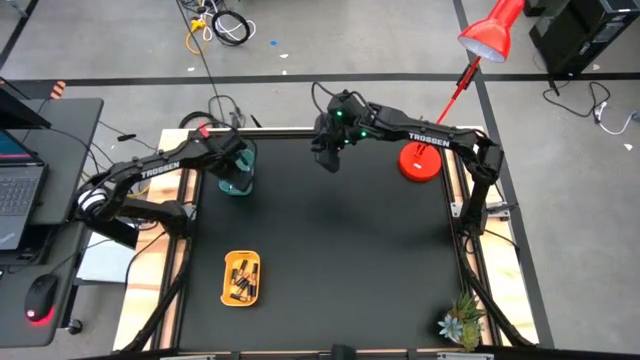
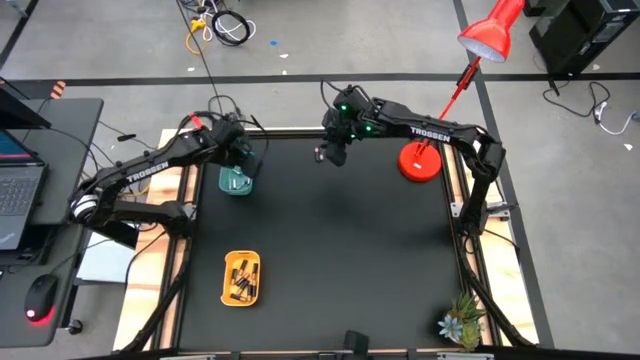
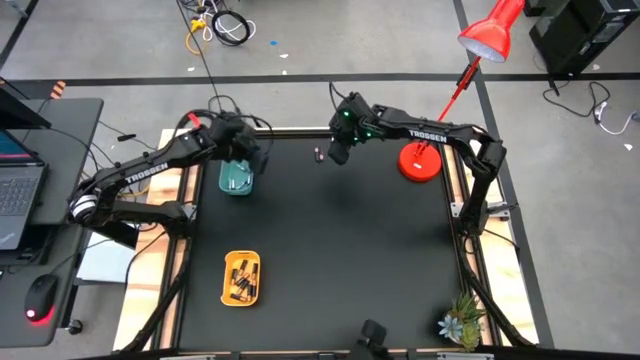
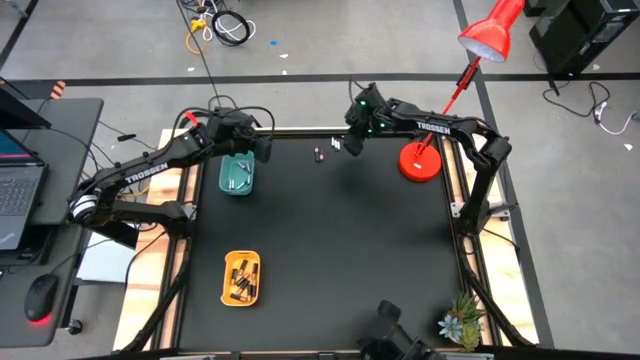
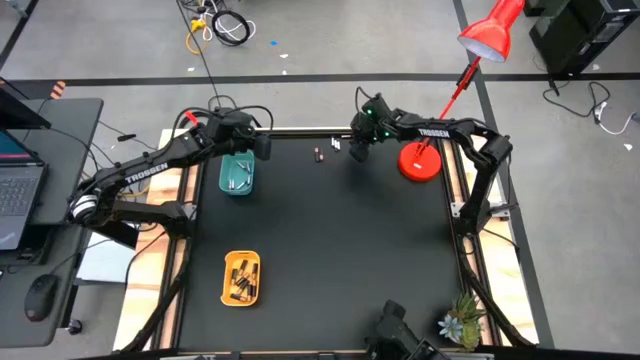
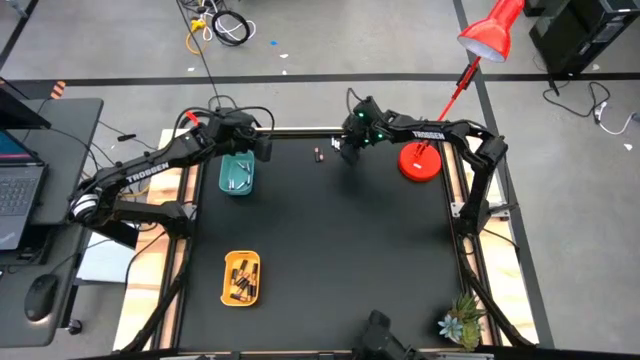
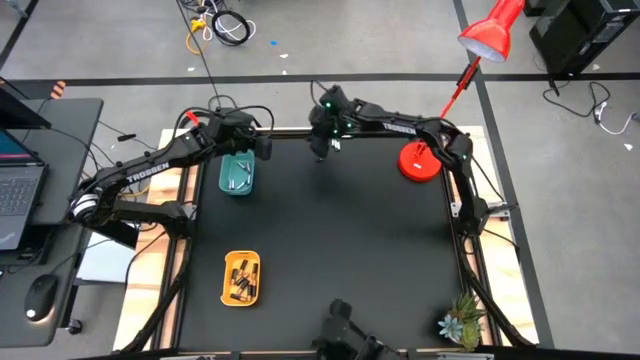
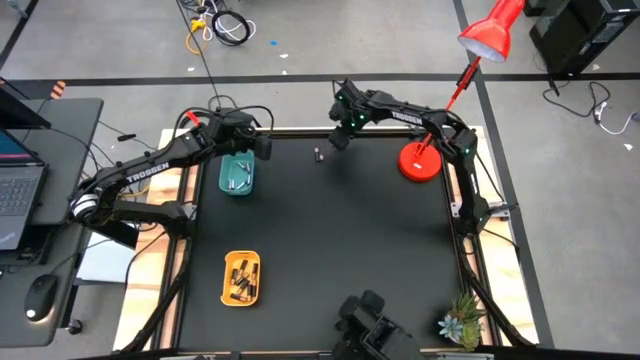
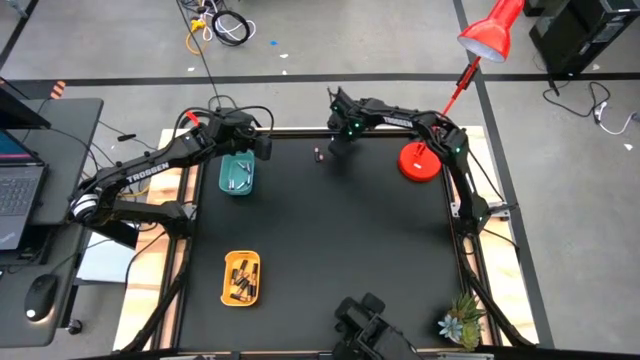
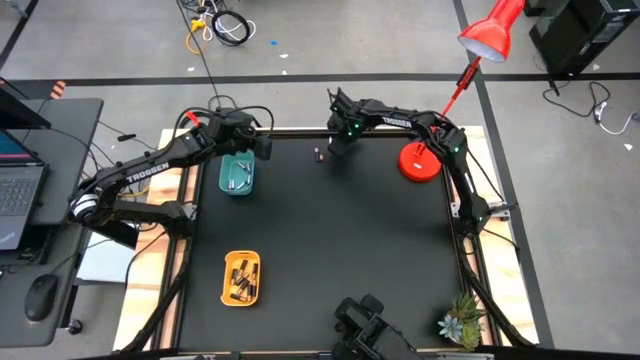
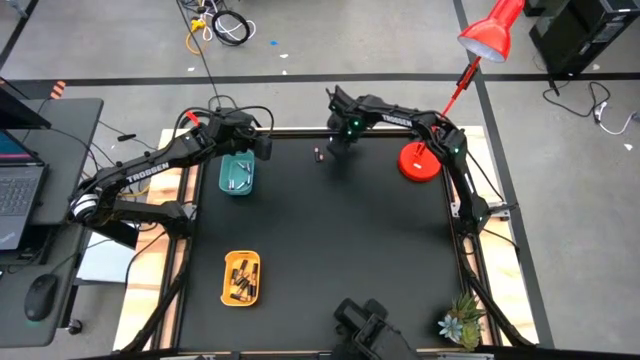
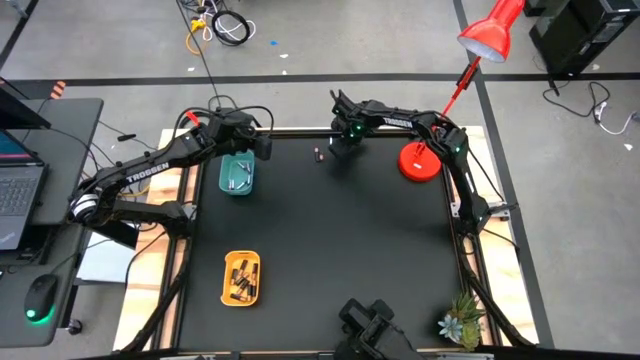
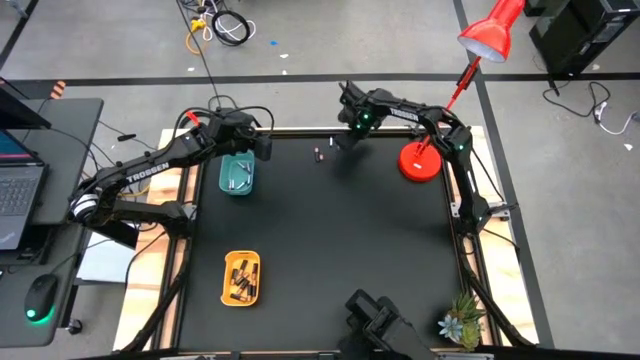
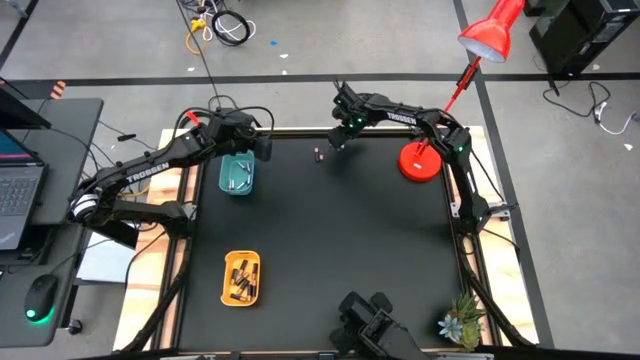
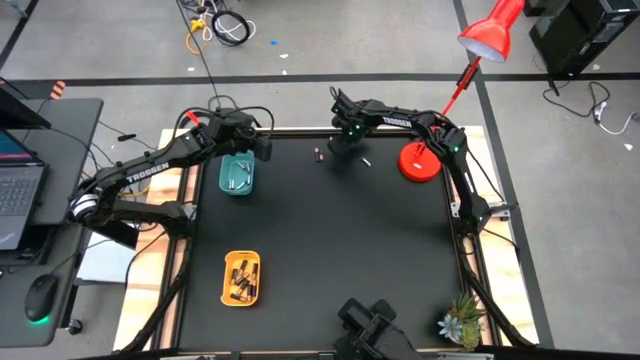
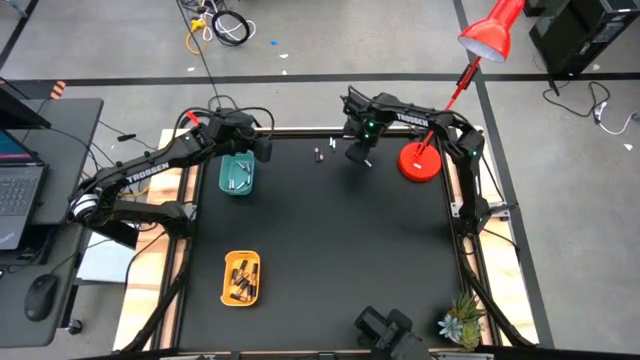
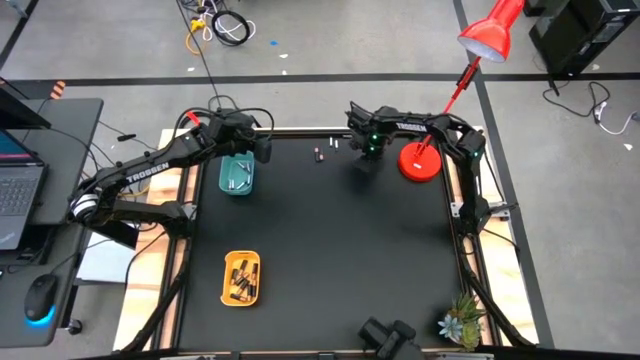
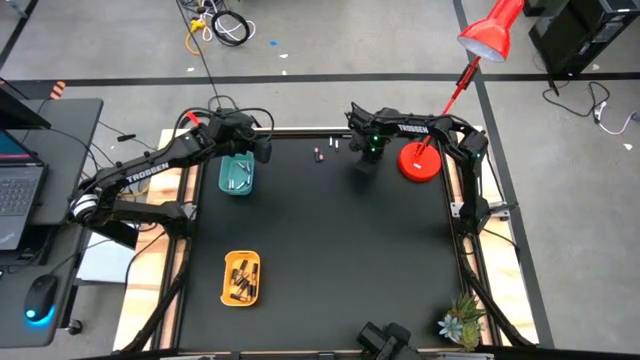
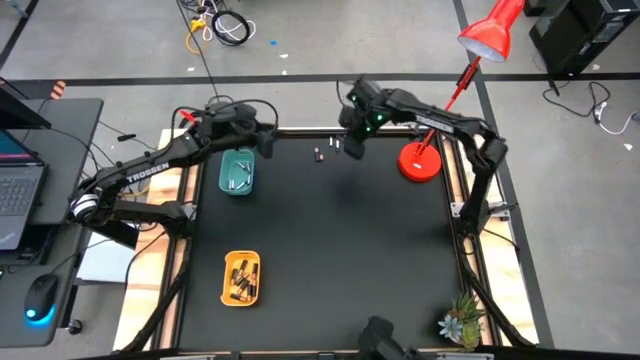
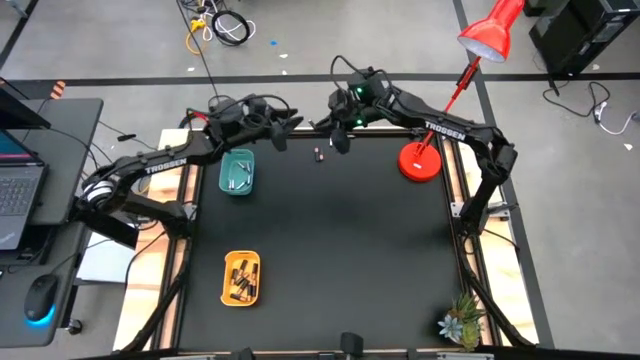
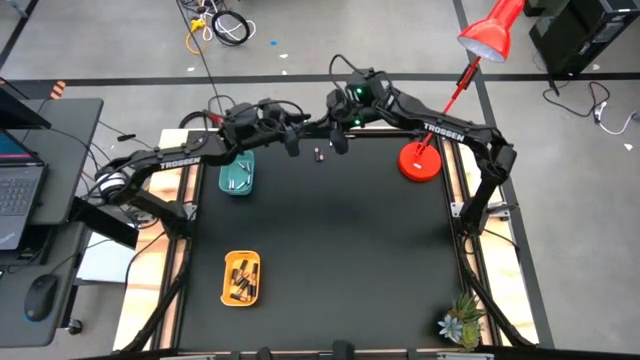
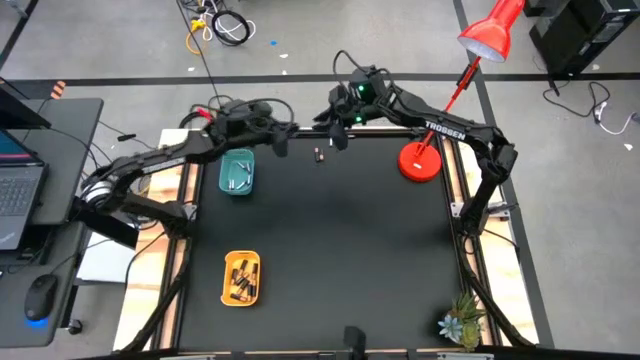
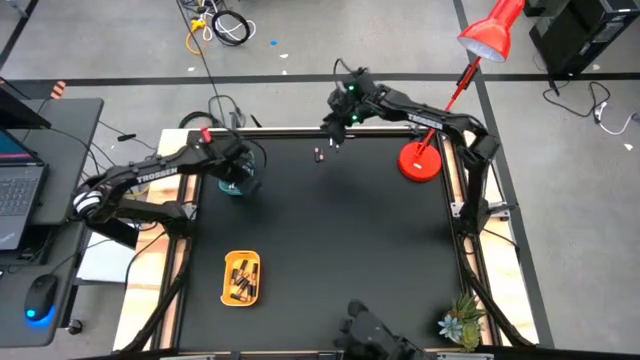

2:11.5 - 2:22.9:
Task: Sort batteries
Put the white battery into the blue bin

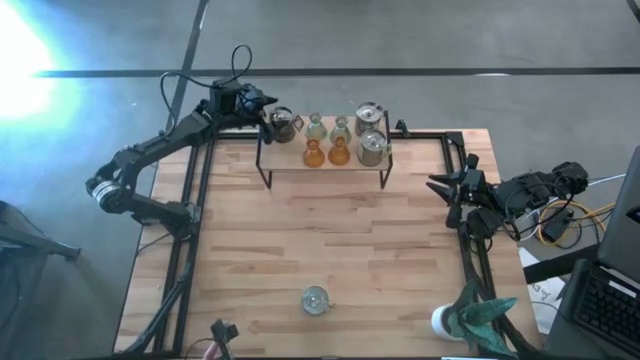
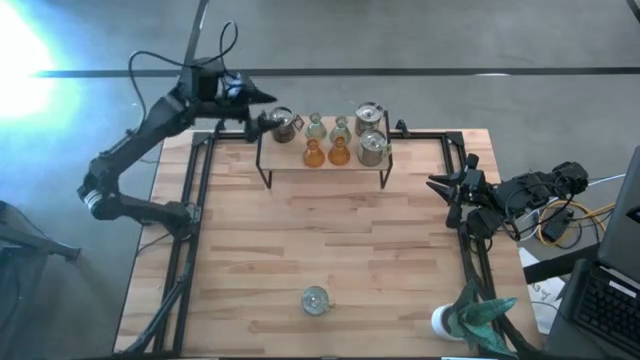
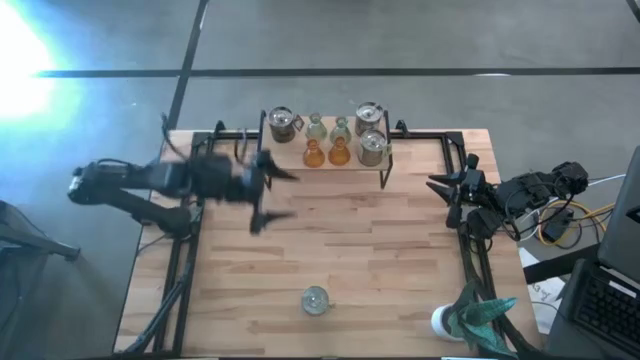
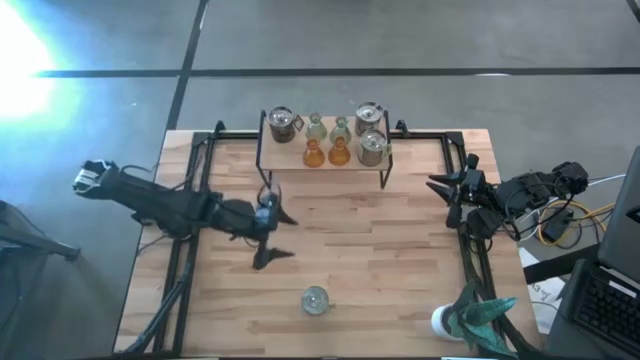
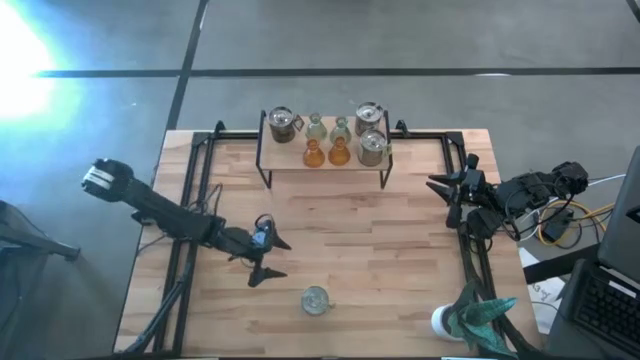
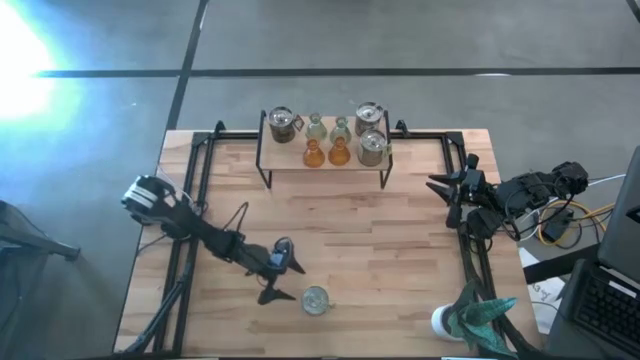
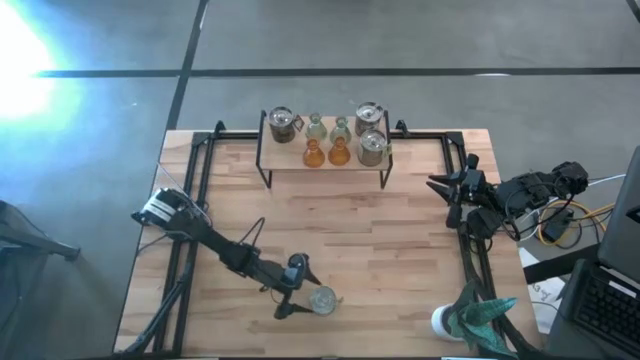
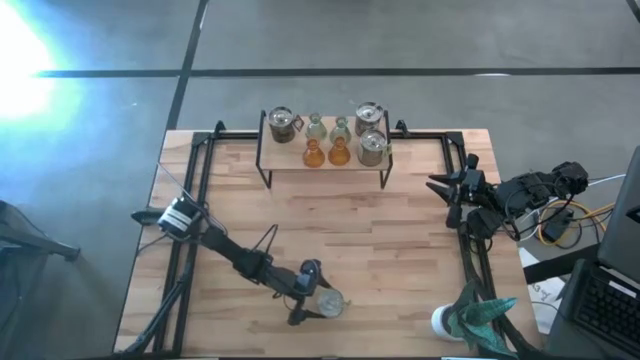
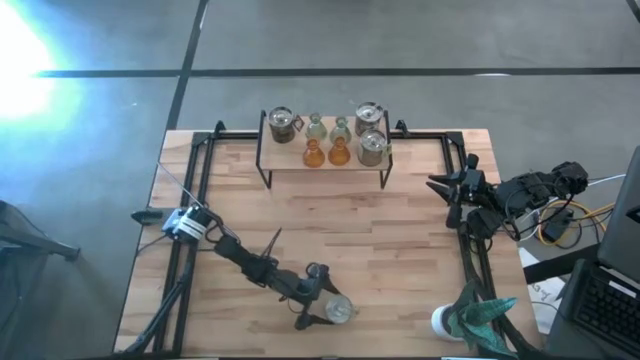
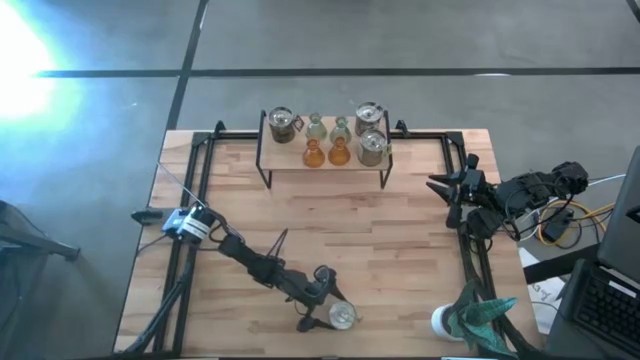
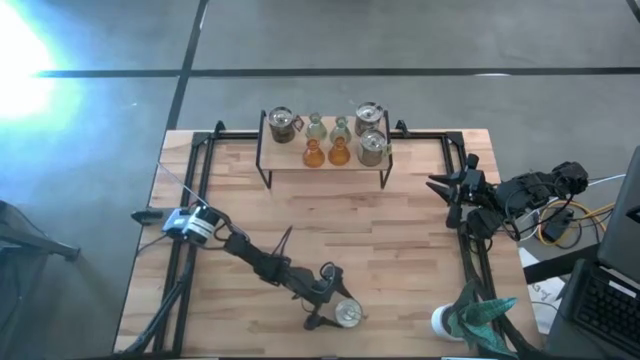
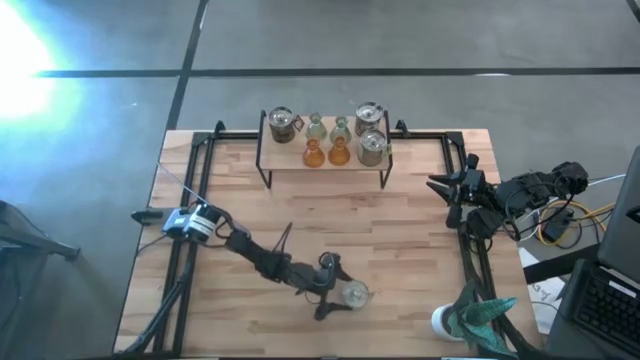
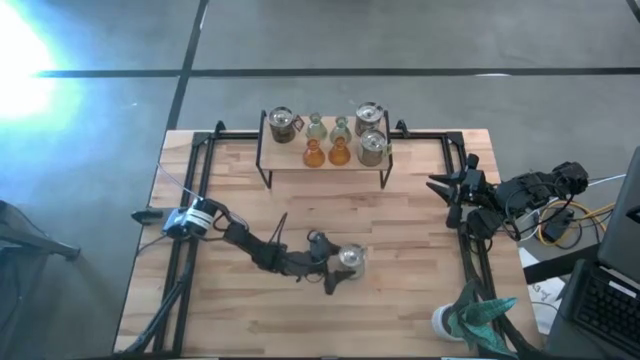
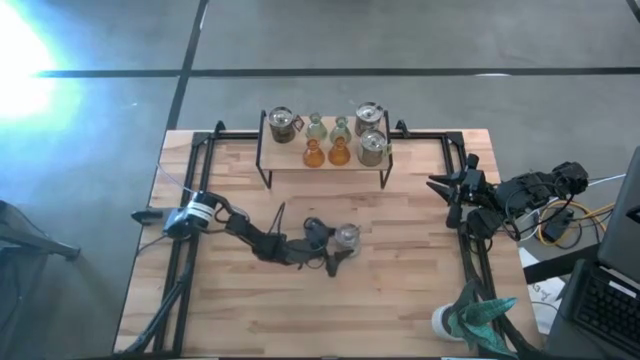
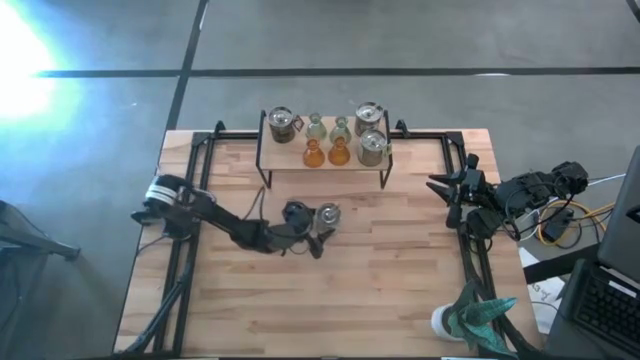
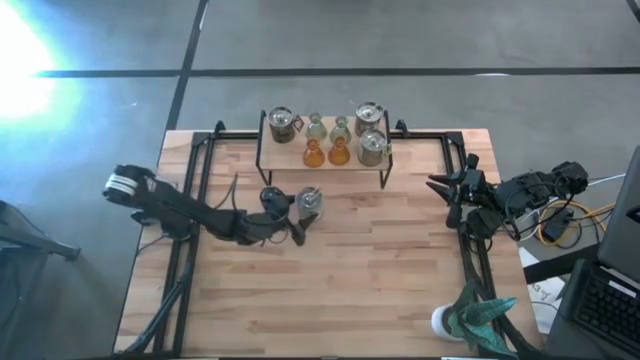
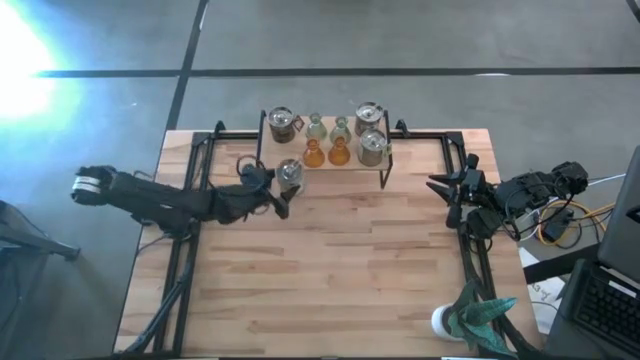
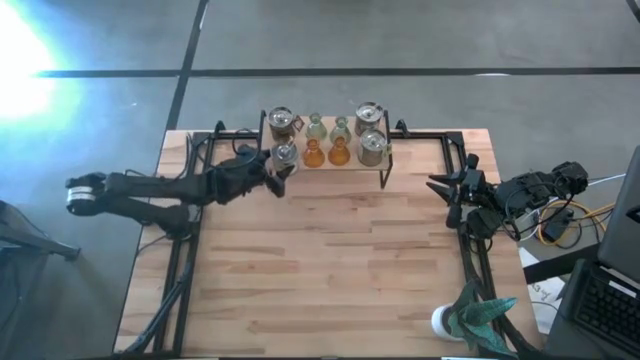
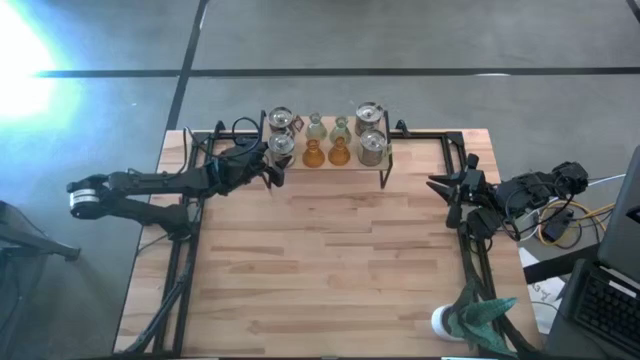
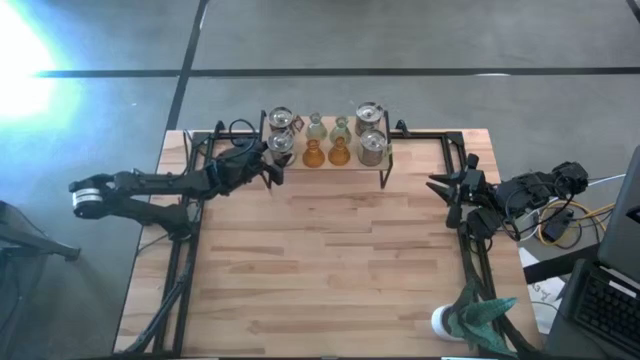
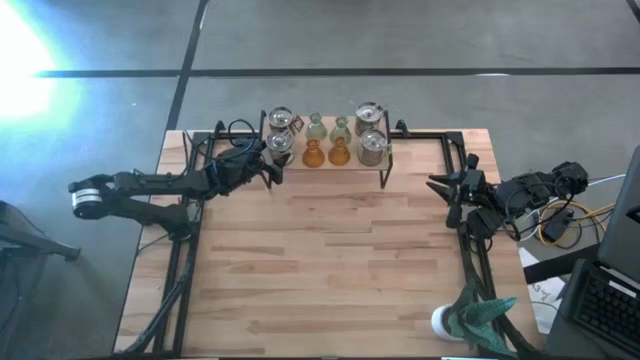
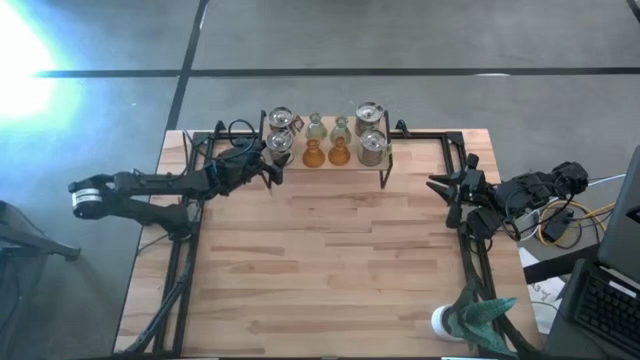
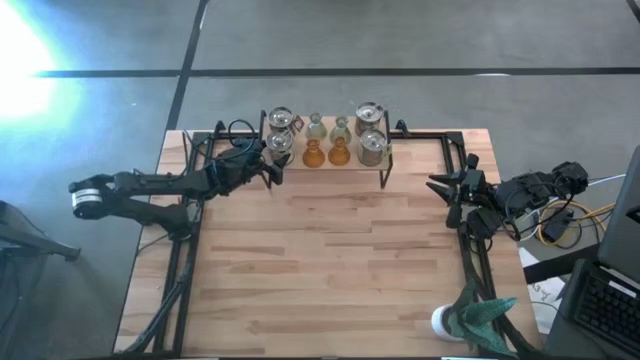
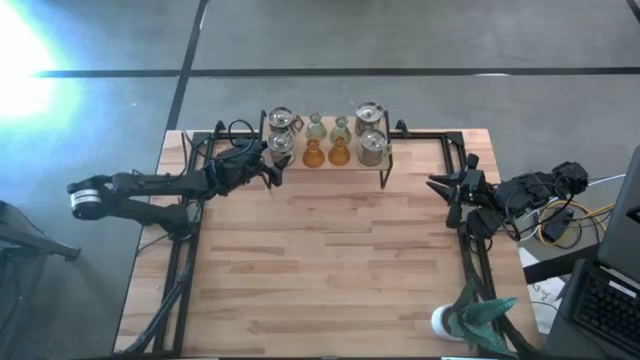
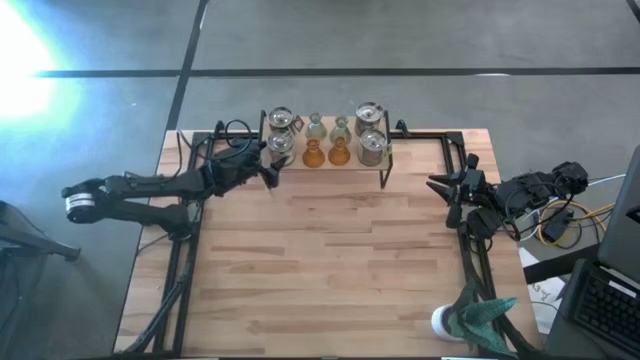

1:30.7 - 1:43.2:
Task: Pick & Place candle stick holders
Put the green scented candle on the shelf aligned with the brown scented candle
